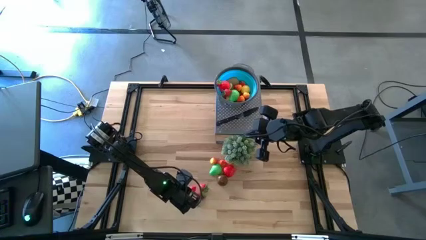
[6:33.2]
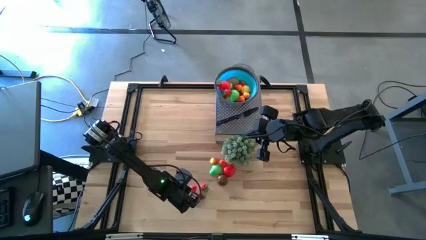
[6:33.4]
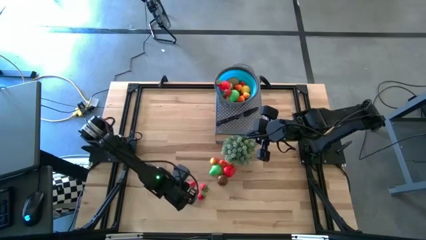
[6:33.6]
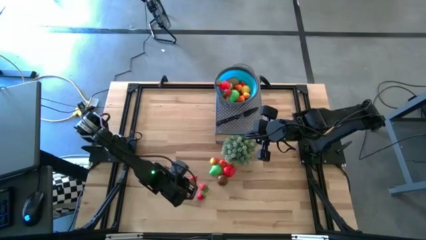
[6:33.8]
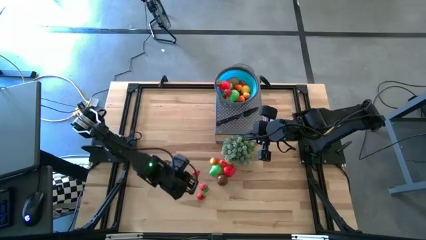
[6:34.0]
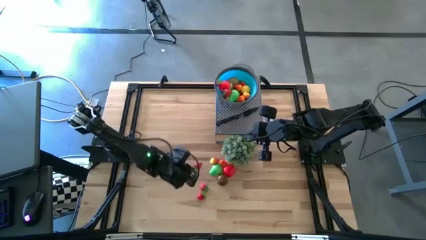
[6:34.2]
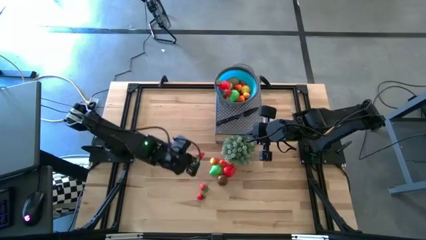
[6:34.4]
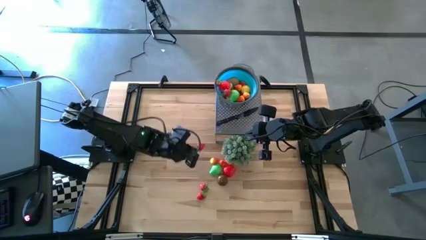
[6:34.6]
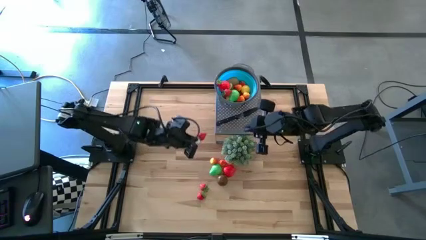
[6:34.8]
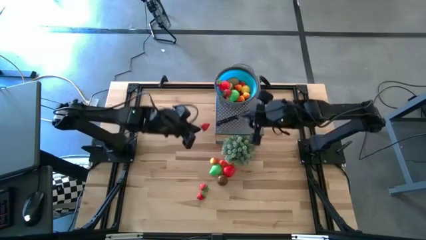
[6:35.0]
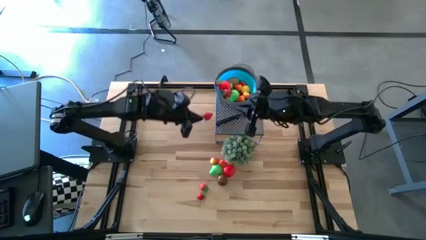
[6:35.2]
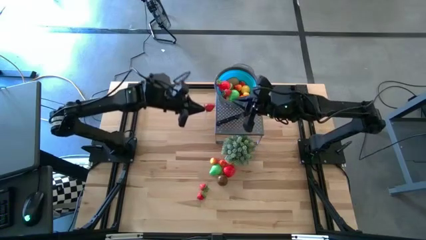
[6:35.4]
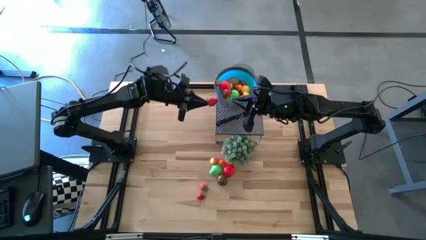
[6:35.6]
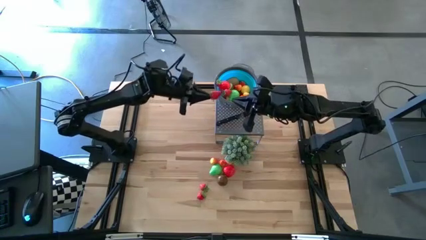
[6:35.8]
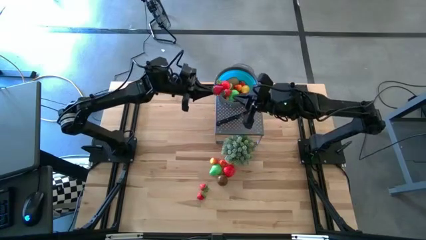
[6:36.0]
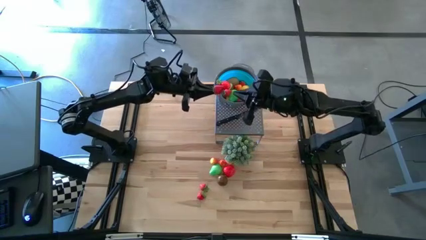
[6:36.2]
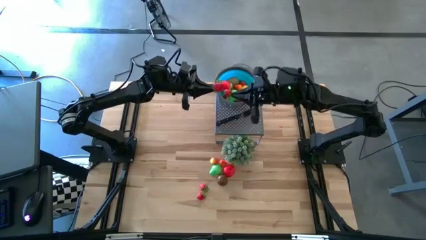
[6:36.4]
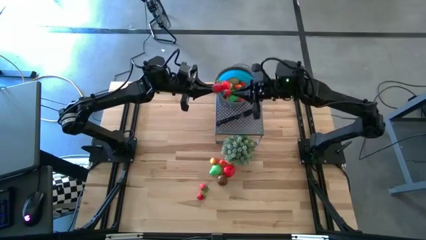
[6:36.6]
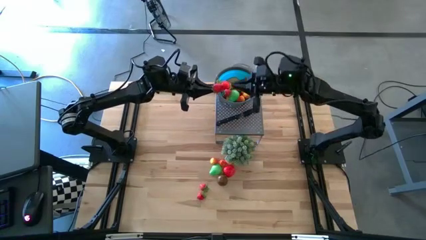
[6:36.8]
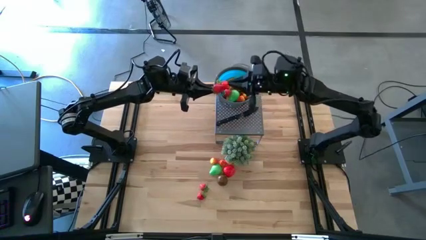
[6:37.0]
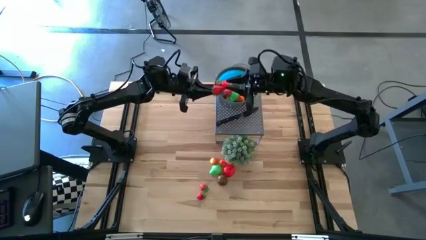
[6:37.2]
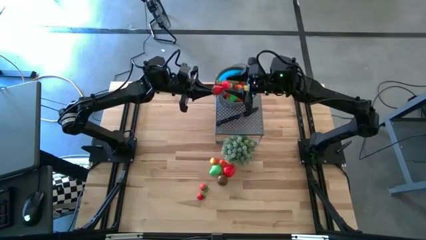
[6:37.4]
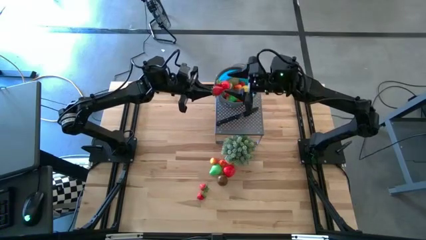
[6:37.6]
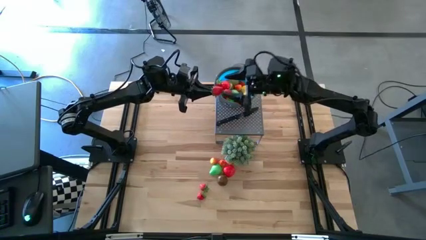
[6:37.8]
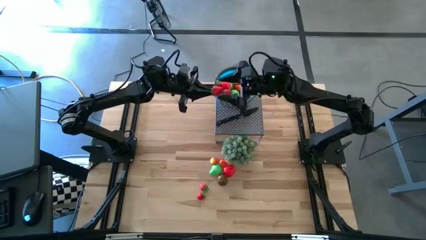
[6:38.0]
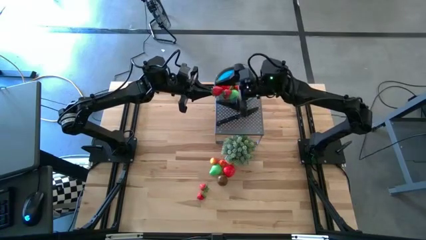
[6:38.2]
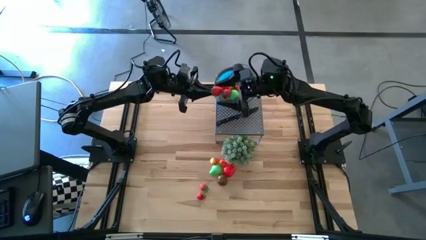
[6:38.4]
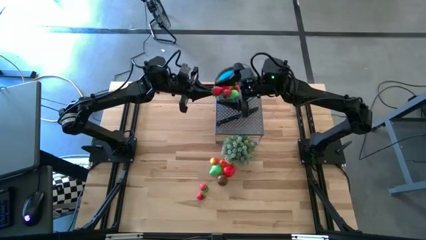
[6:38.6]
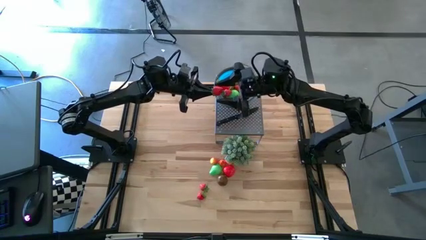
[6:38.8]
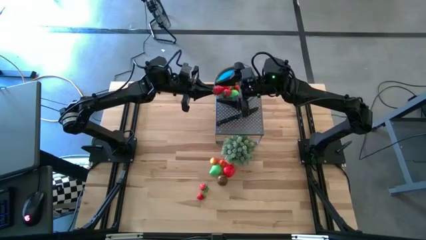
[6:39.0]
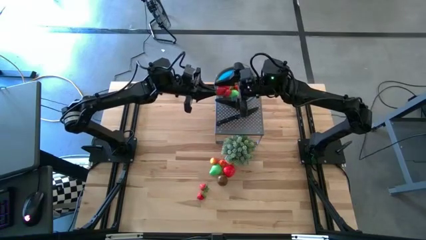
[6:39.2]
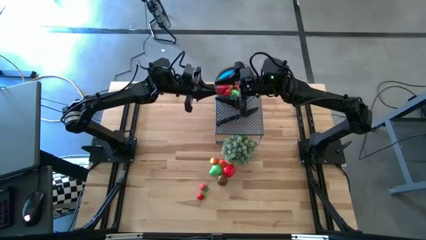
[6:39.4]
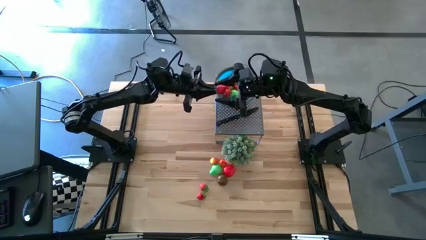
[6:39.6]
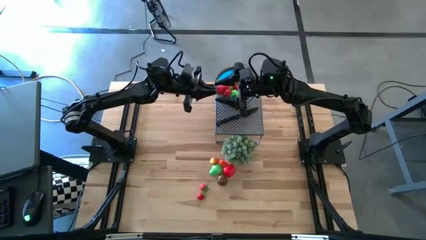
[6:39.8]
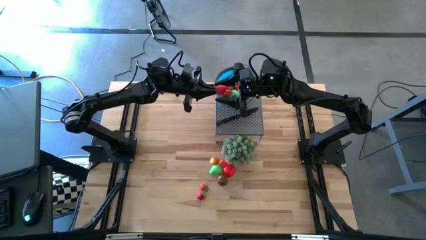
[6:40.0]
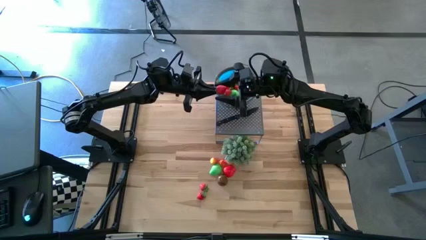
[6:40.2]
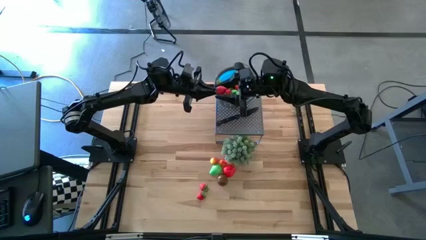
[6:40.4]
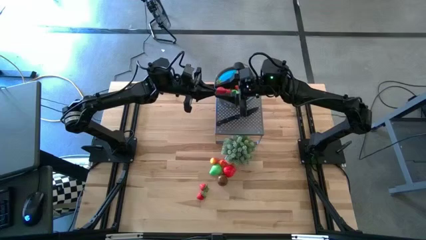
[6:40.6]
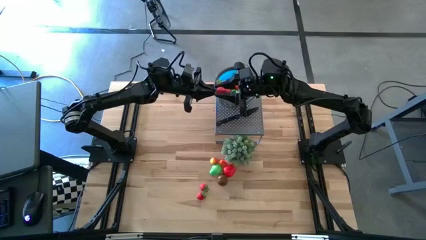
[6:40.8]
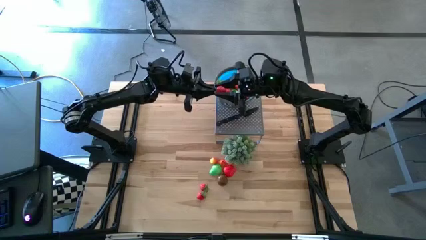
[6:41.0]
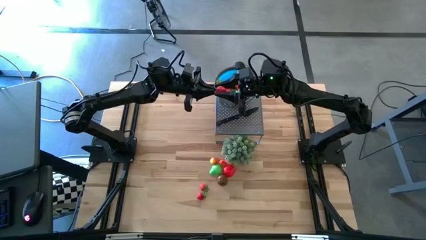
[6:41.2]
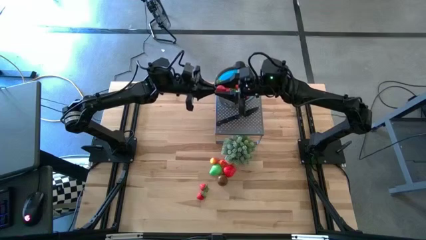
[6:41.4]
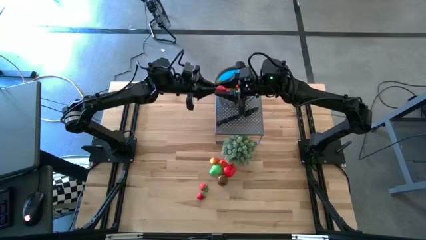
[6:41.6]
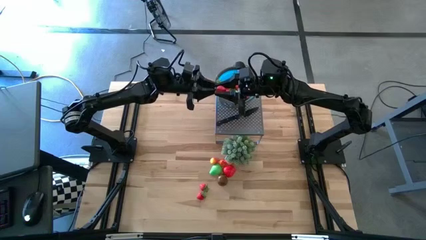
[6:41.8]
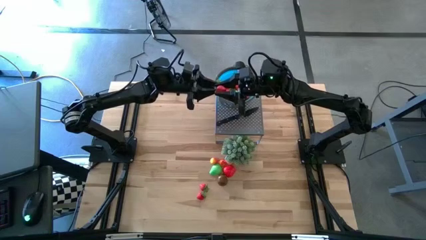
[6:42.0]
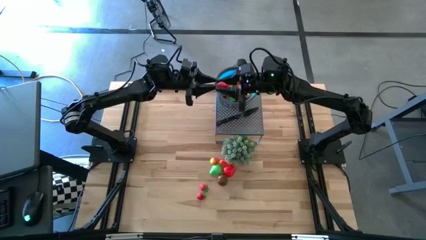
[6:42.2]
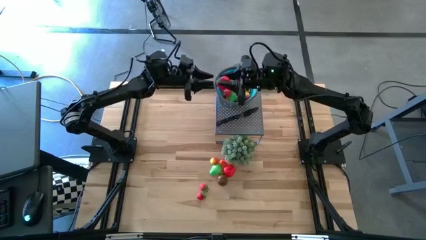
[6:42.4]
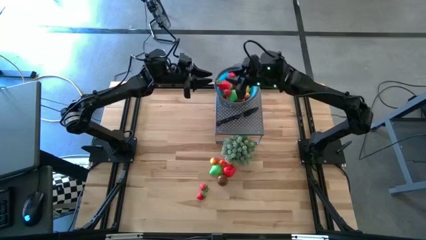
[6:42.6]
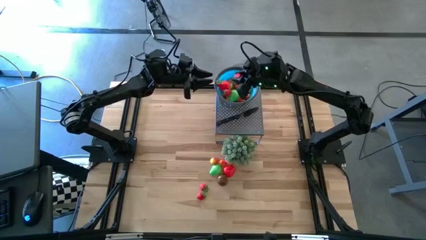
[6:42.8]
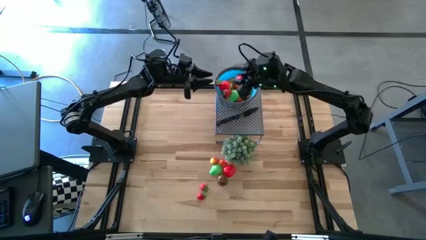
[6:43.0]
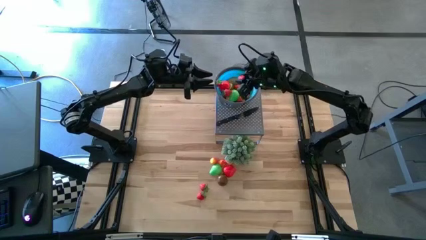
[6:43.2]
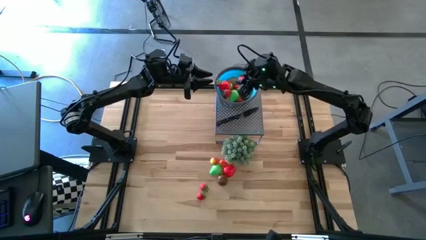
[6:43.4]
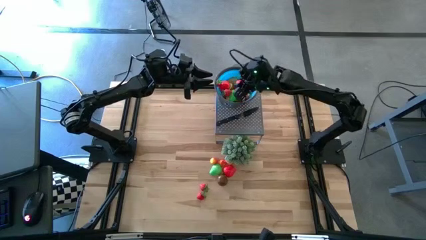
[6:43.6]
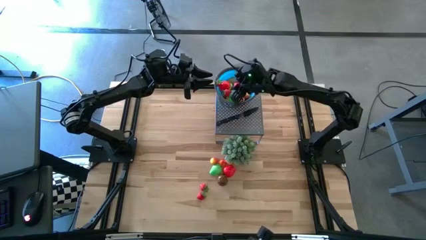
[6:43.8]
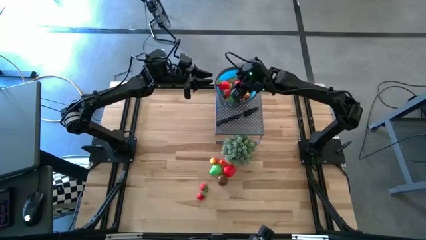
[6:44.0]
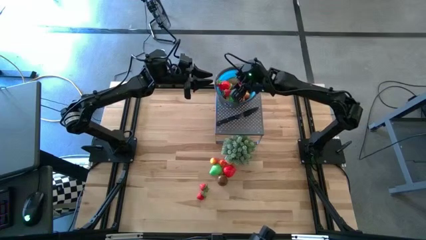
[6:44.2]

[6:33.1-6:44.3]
Task: Pick & Place Fruit
Put the red strawberry into the blue strainer bowl

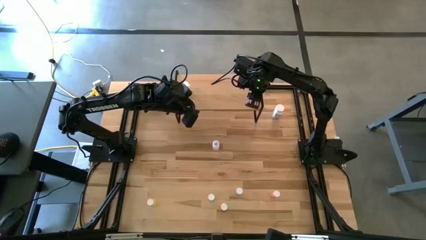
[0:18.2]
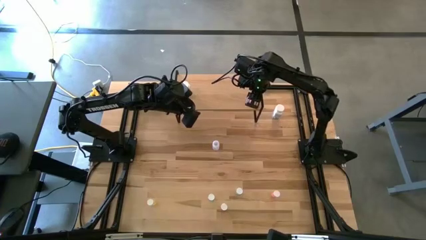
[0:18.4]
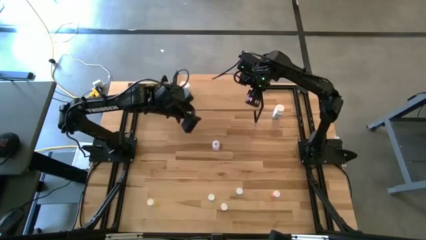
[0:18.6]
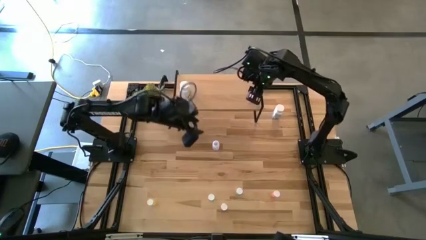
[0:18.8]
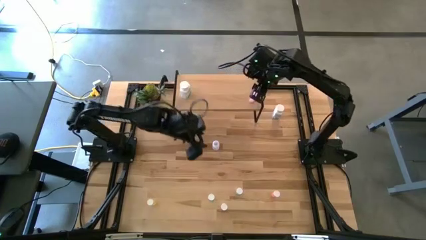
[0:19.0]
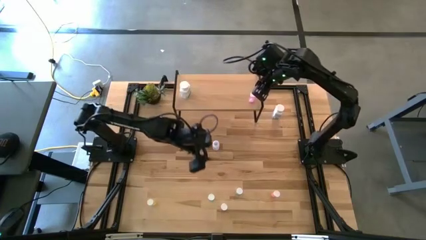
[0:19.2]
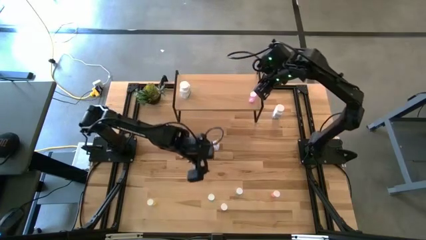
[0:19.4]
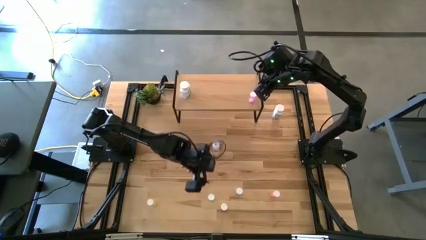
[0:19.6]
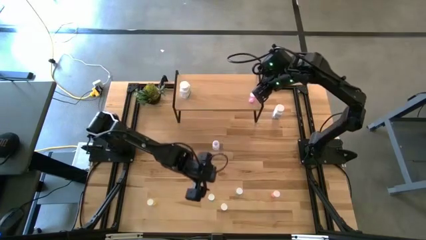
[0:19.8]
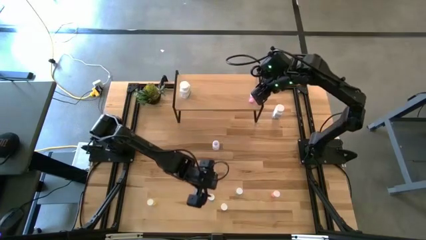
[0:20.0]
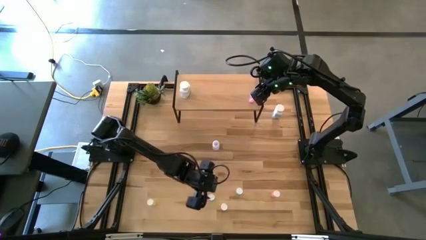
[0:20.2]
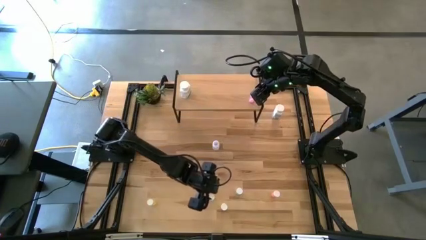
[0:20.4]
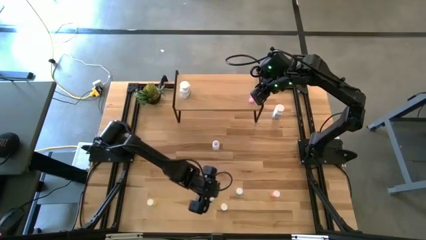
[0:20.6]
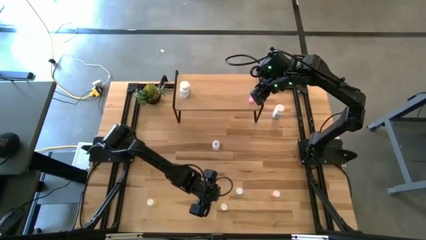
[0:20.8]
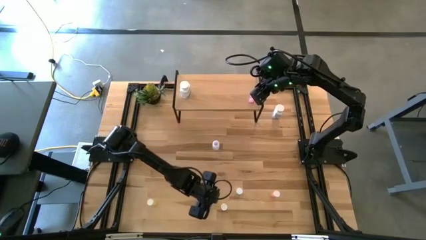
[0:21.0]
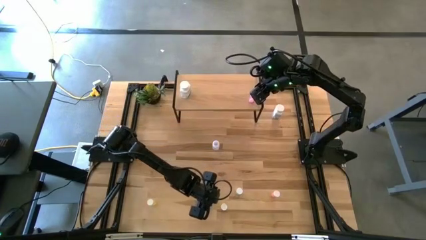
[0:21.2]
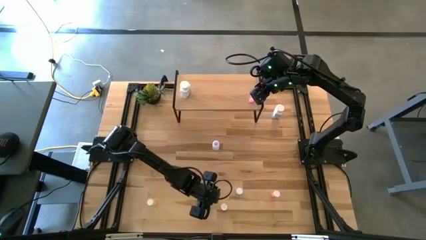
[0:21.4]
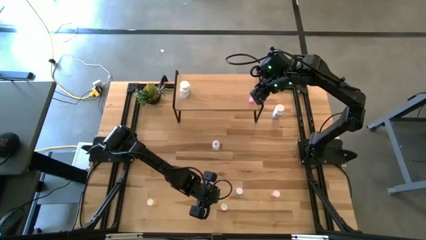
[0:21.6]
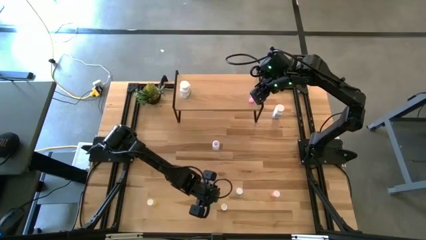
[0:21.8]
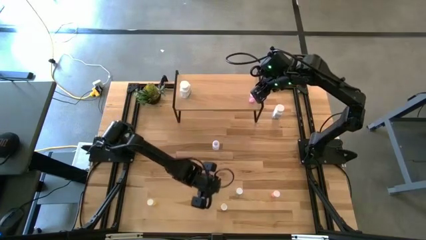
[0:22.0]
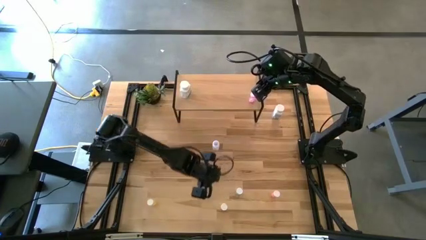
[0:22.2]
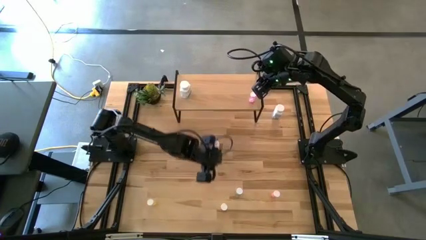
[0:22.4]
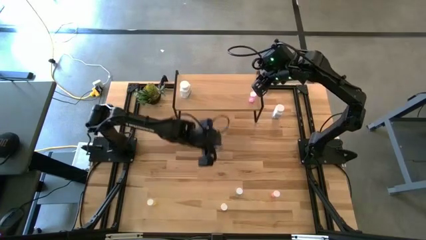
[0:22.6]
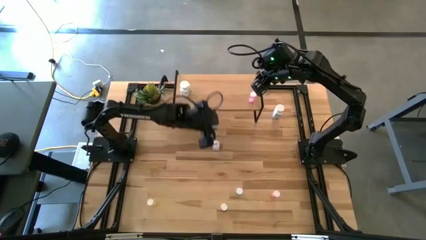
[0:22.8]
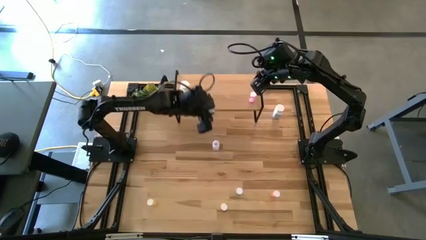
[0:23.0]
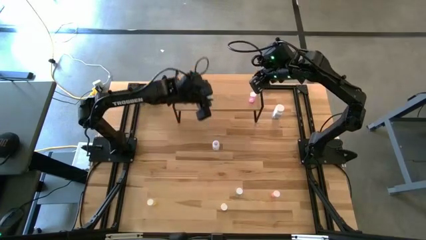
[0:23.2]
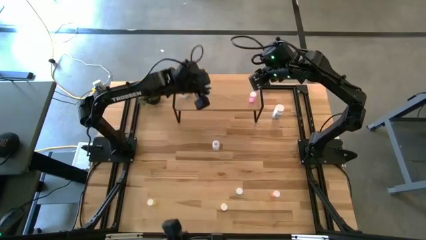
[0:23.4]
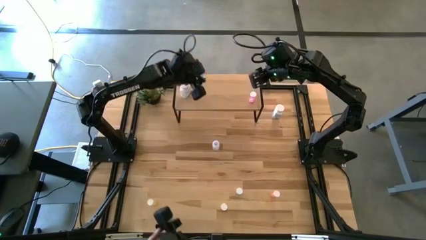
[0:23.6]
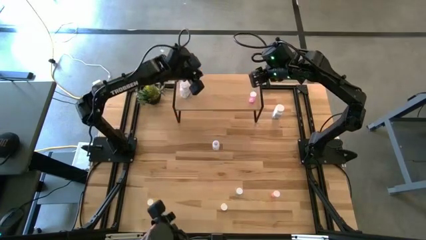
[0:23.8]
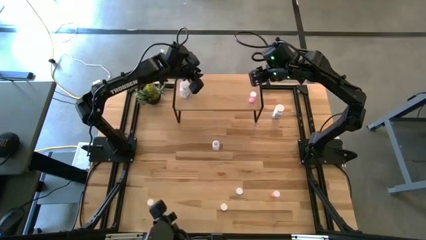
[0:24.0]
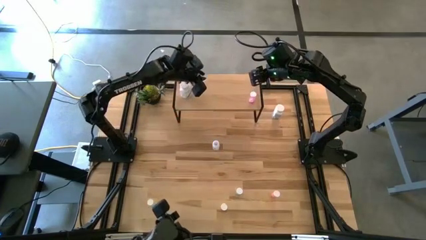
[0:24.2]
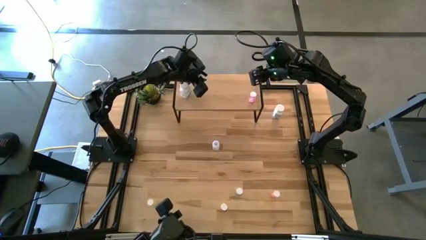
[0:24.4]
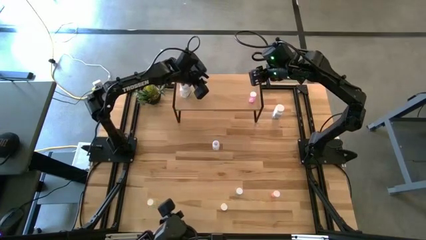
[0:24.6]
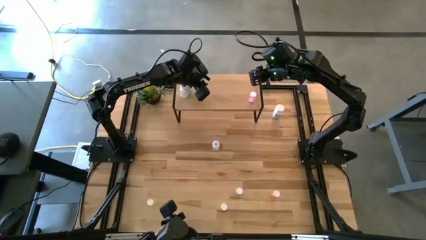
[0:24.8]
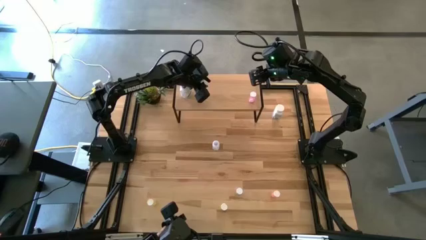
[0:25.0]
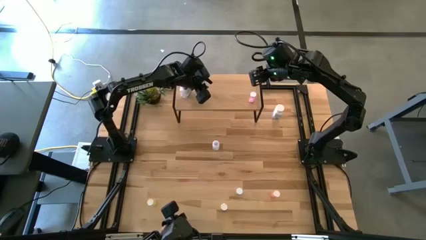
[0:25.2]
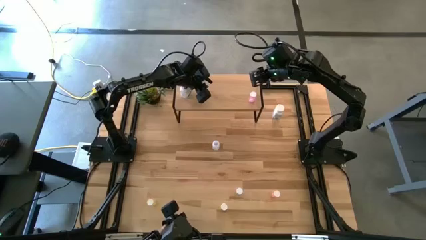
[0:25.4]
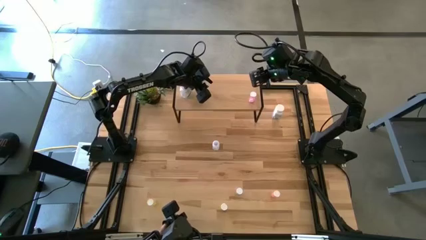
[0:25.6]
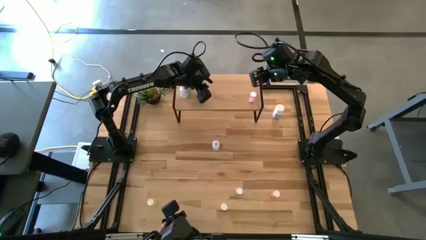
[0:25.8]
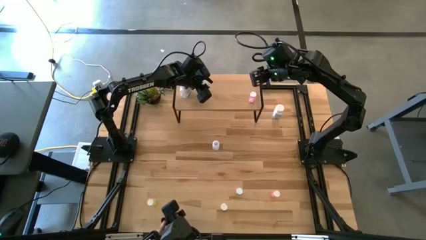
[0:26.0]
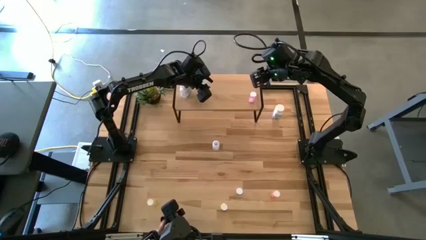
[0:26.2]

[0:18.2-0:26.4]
Task: Pick and place medicine bottles onto shelf by color
Put the left blue pill bottle on the shelf
